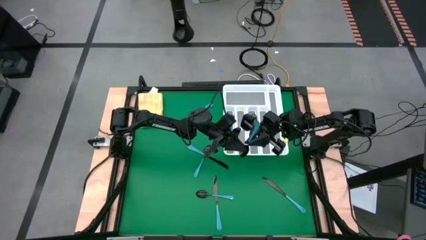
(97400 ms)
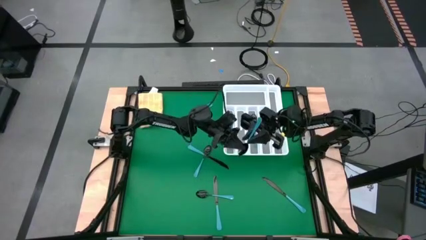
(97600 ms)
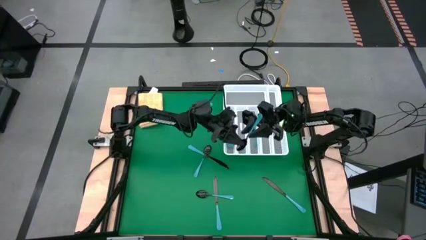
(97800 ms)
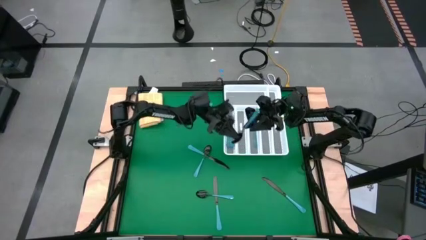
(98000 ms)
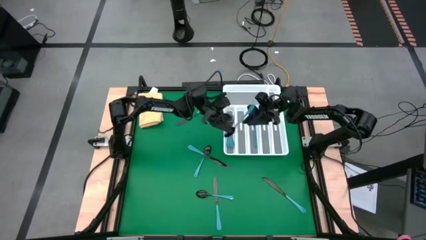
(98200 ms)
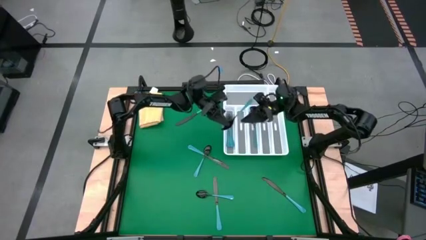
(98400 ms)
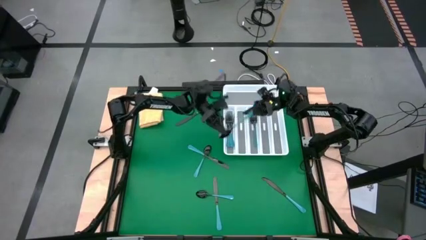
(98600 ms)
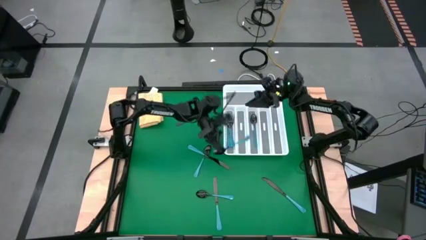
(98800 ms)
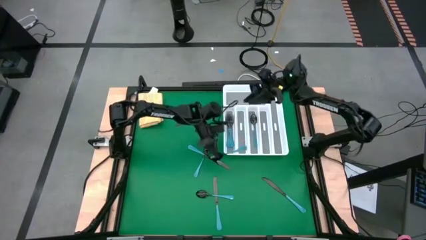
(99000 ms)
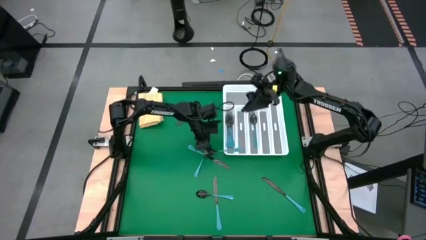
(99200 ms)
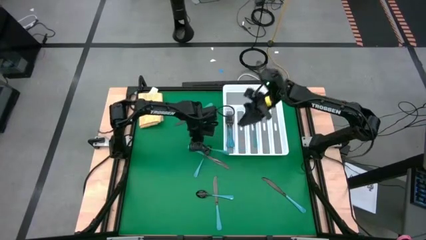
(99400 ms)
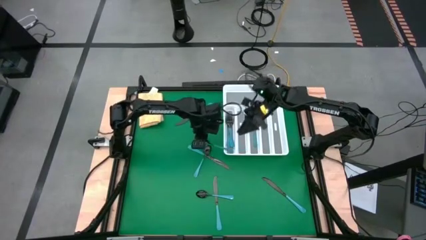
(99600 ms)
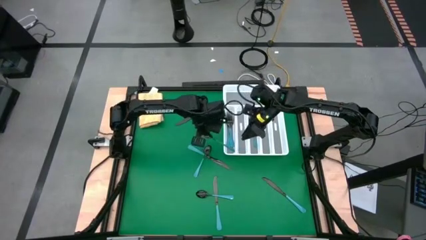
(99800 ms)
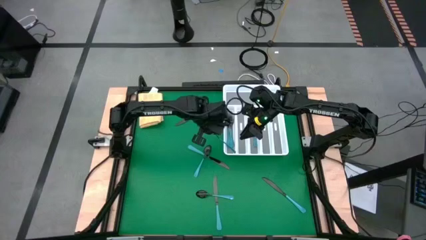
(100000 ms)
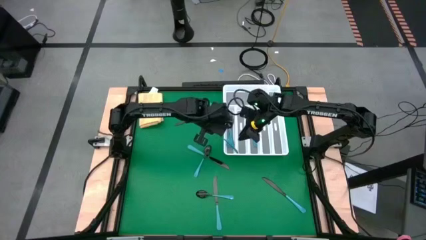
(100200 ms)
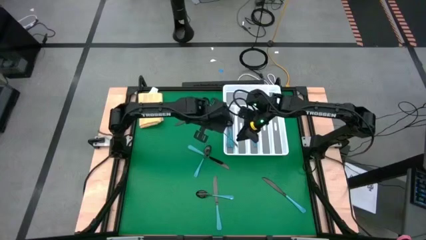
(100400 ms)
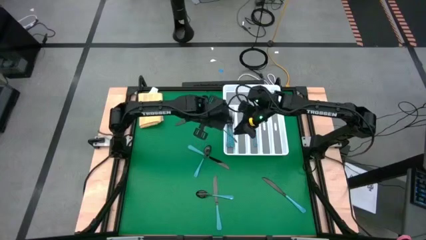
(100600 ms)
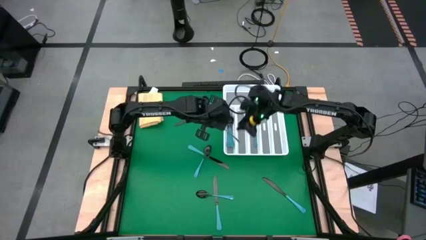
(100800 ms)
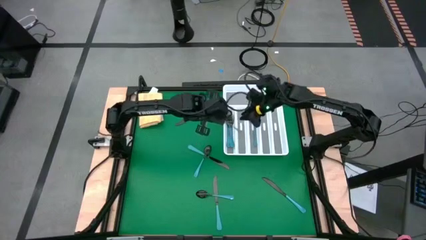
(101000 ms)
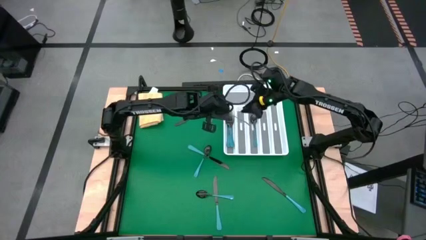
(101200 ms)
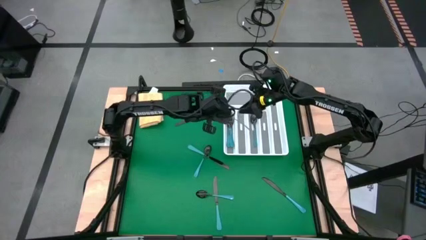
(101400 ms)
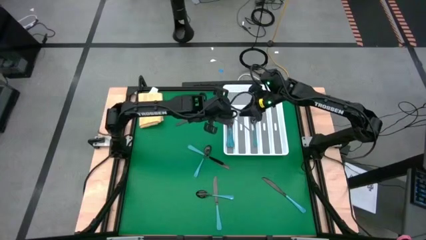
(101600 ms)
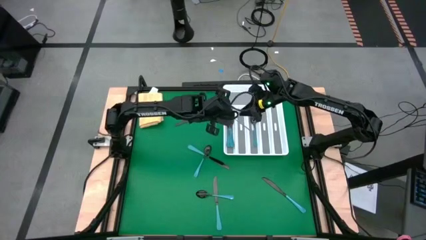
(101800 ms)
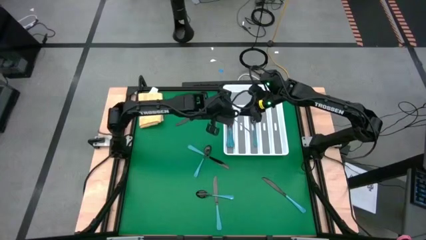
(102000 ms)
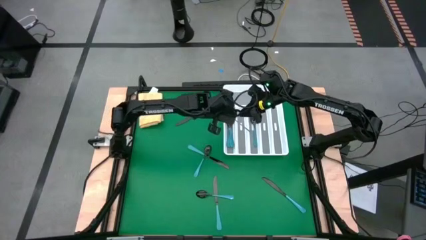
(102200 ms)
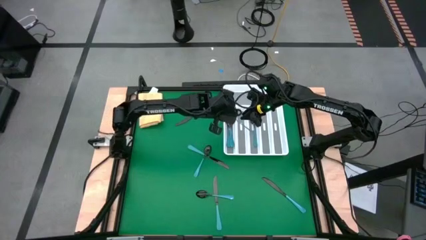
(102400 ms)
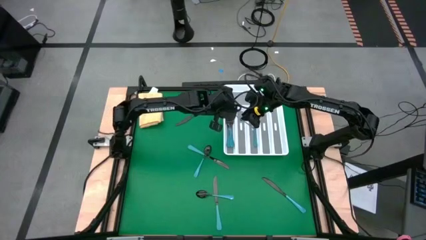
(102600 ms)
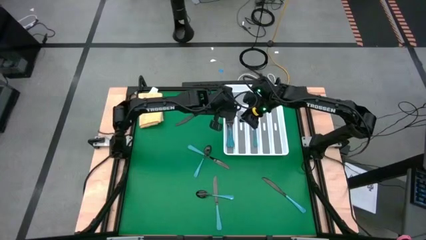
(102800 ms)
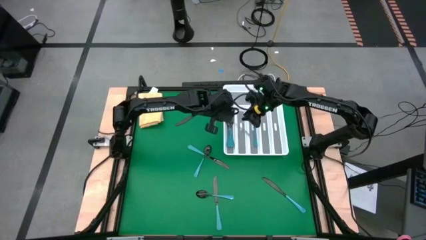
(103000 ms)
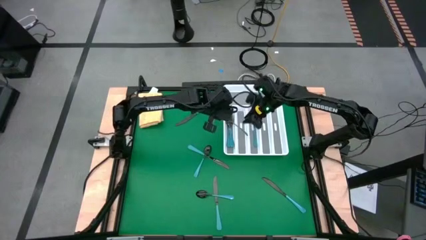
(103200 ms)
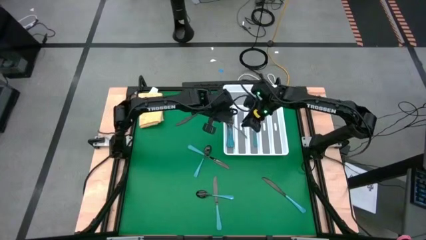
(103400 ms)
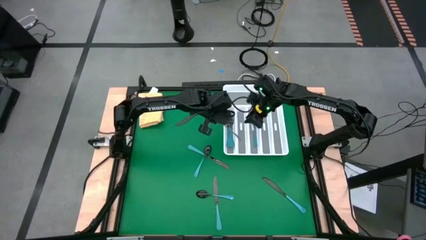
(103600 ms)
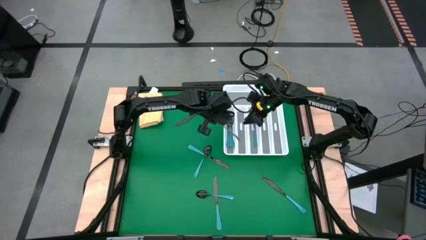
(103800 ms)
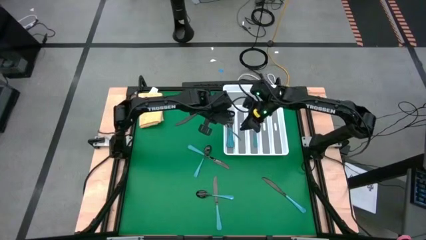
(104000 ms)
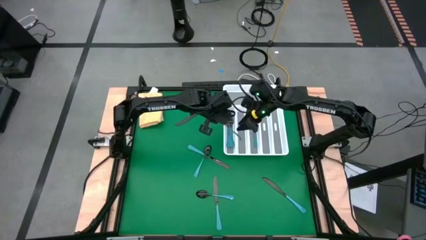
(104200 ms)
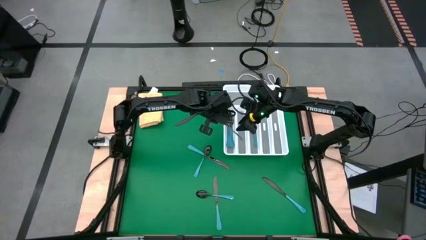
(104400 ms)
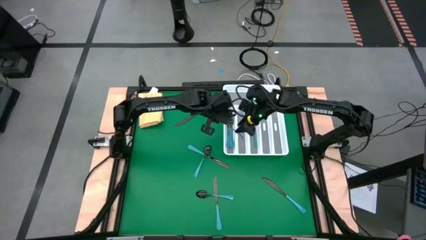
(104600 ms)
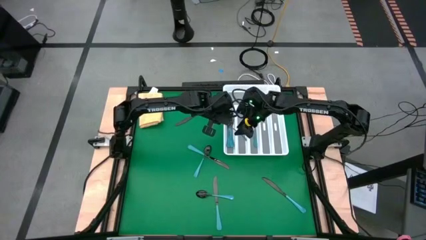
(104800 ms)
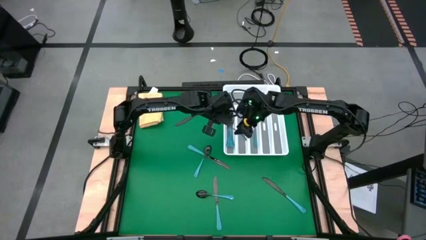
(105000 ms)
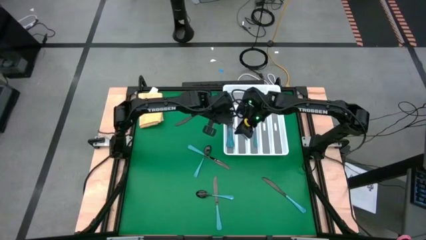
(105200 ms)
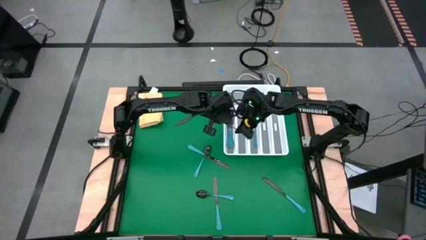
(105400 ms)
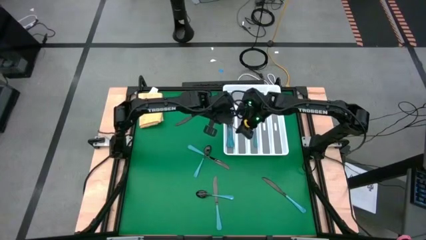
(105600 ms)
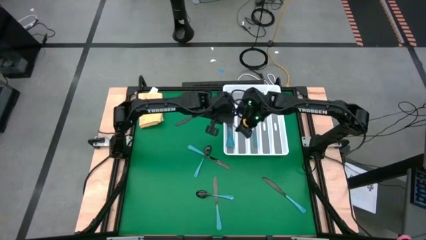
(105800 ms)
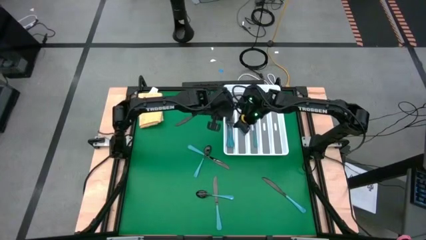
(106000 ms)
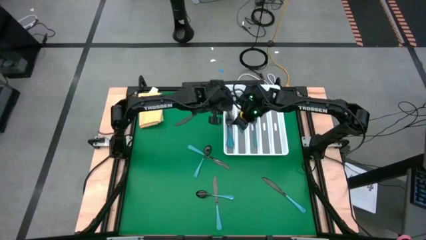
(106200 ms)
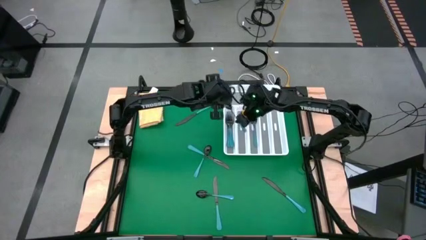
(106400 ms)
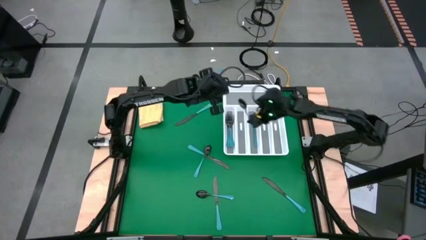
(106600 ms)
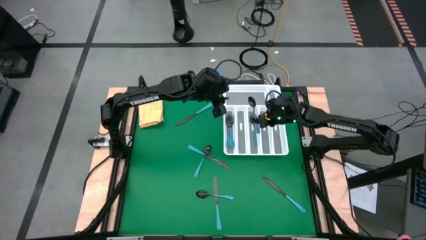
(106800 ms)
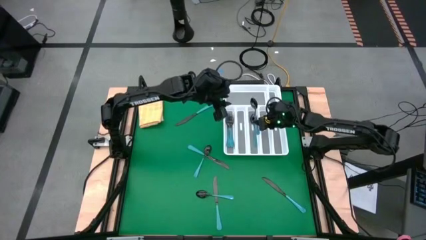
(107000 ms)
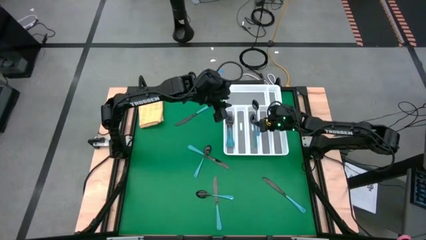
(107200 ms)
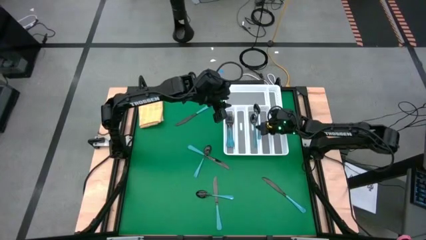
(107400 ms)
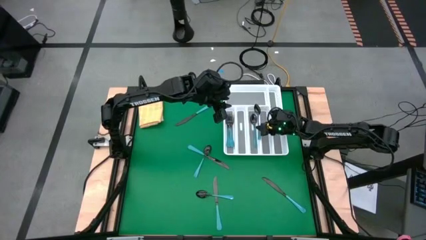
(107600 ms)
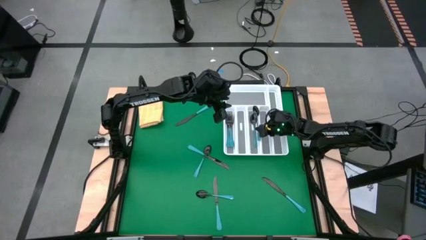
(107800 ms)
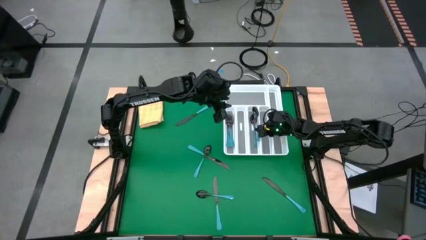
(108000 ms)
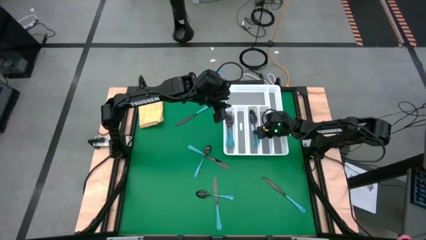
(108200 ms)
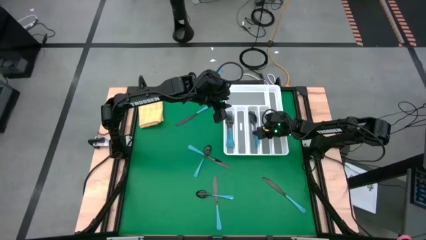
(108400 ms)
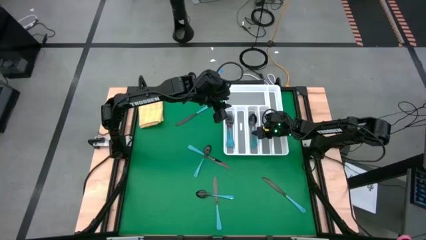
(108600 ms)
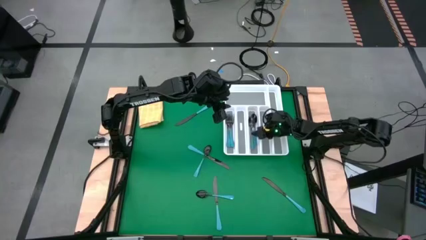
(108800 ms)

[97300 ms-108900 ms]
Task: Sort silverware
Put the blue spoon into the silverware organizer

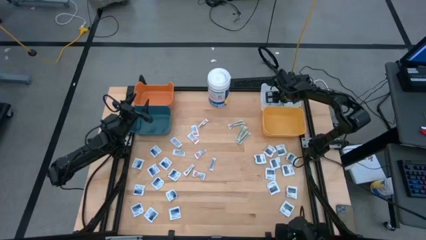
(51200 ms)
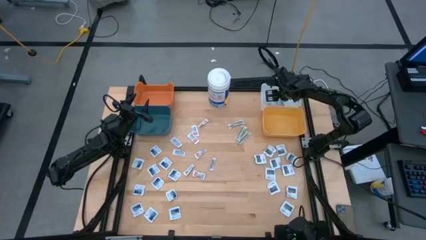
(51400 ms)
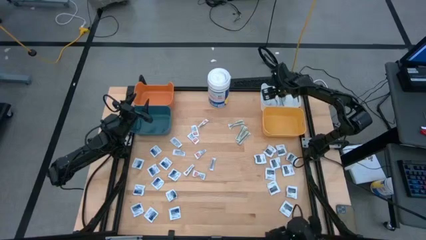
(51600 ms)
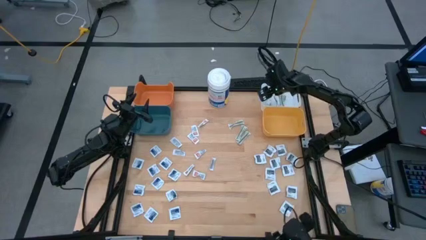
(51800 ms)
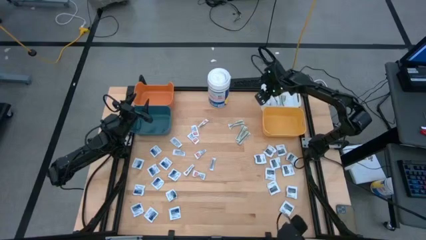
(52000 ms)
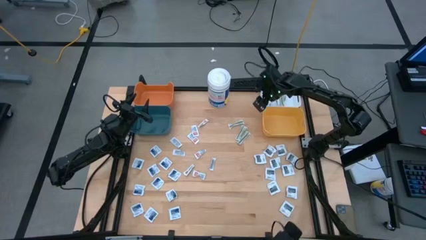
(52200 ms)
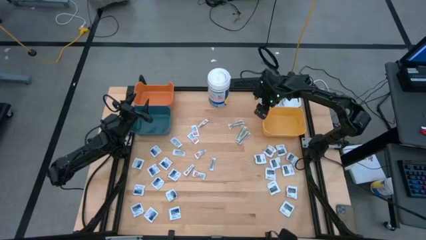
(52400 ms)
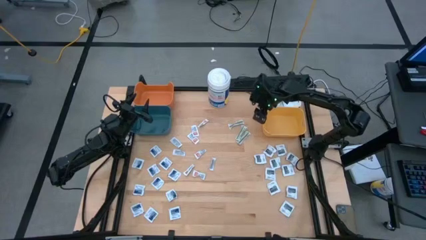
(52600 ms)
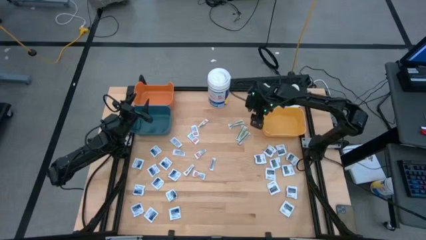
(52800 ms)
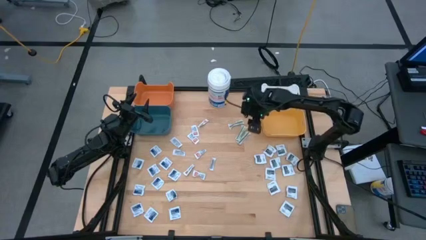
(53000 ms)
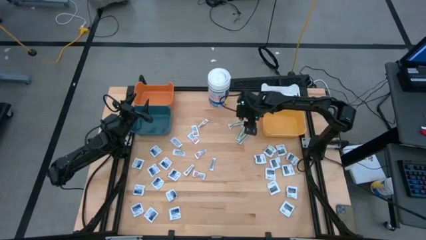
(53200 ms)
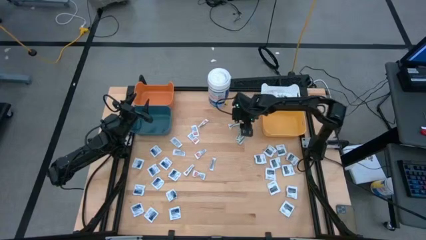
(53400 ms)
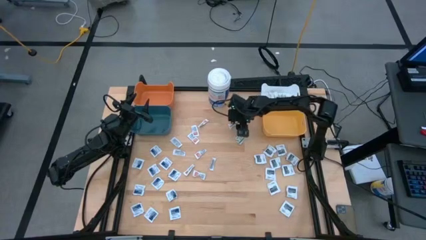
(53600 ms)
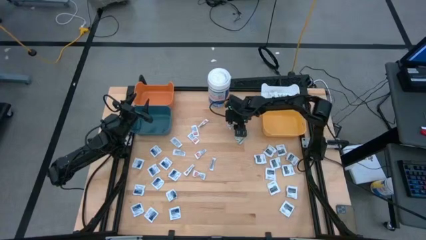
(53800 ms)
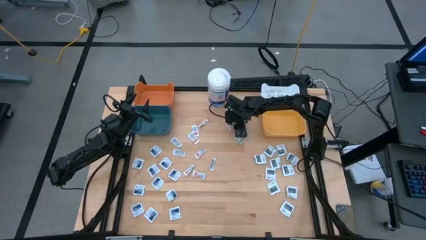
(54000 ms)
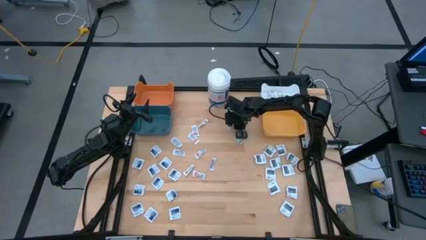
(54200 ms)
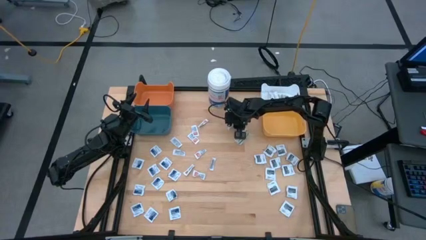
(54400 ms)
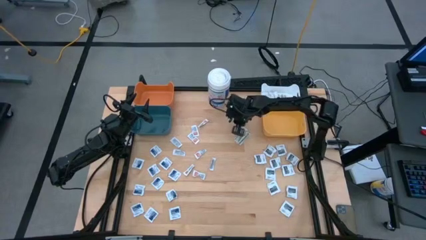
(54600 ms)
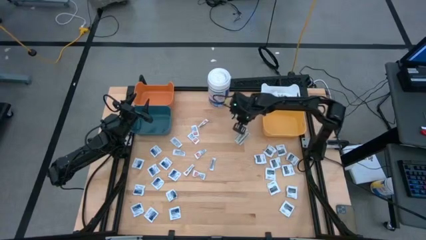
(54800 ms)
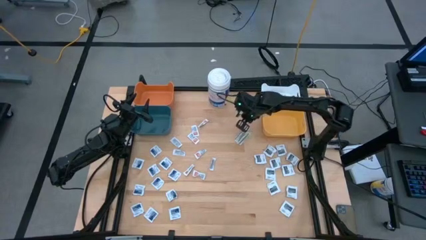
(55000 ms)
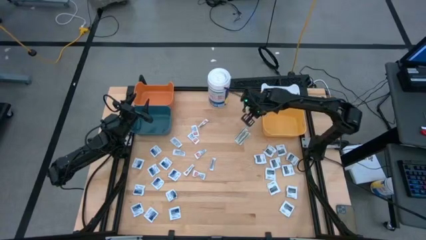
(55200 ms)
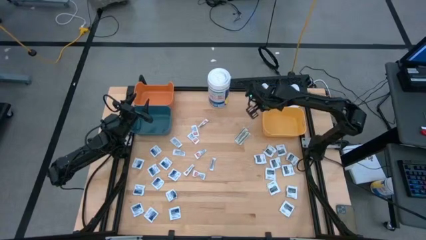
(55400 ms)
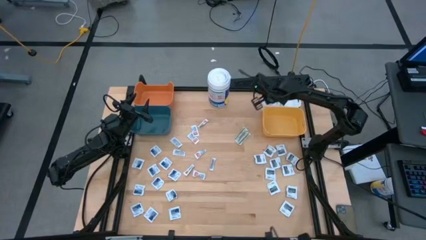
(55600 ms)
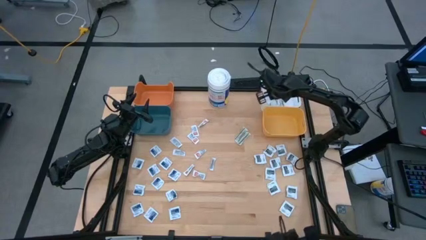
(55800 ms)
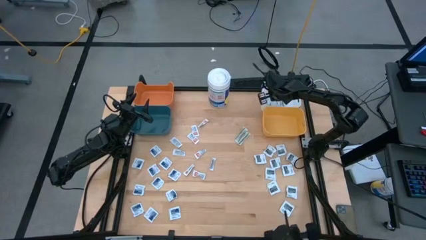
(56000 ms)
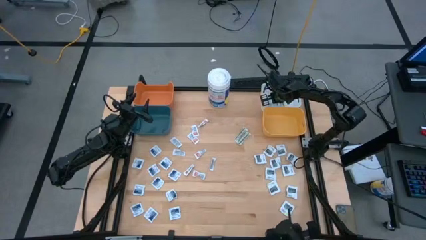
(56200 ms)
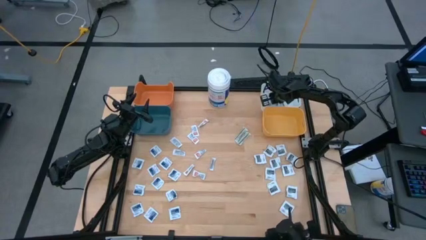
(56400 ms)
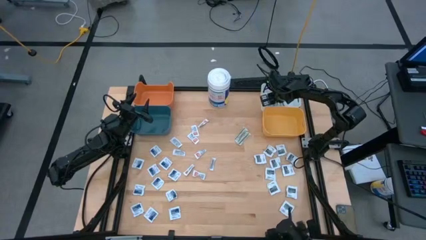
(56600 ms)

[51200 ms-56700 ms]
Task: Pick & Place First Aid Supplies
Put the green bandage into the white bin
